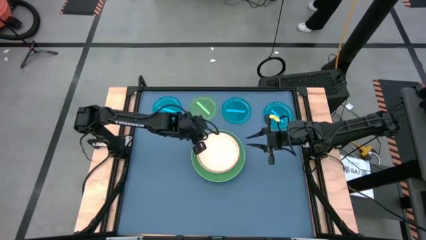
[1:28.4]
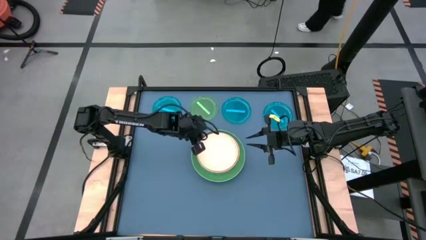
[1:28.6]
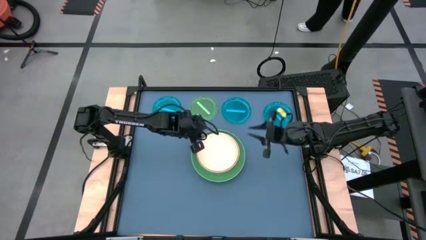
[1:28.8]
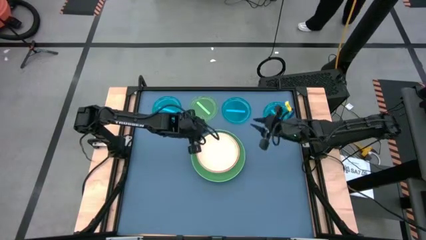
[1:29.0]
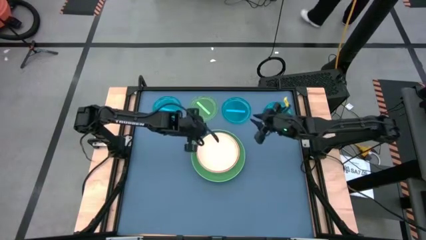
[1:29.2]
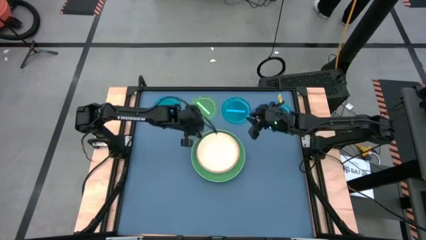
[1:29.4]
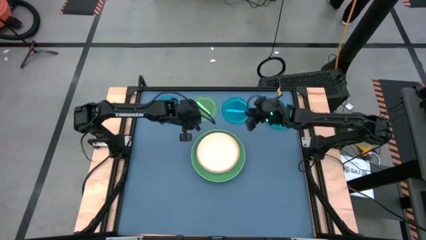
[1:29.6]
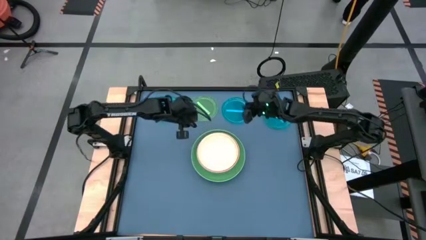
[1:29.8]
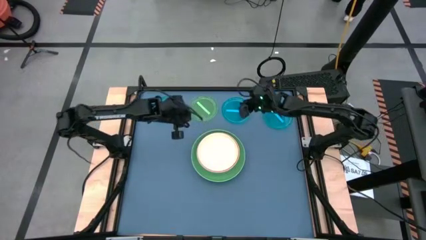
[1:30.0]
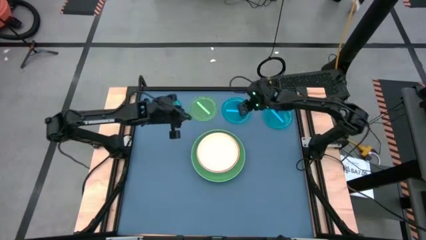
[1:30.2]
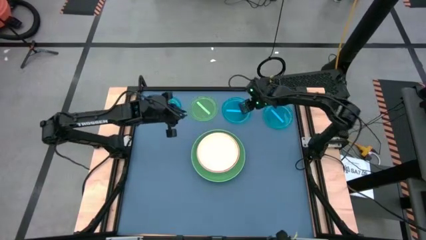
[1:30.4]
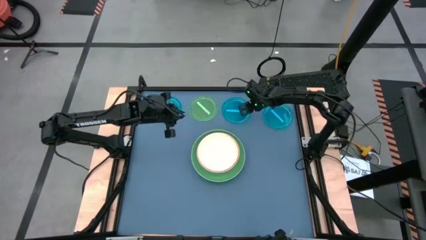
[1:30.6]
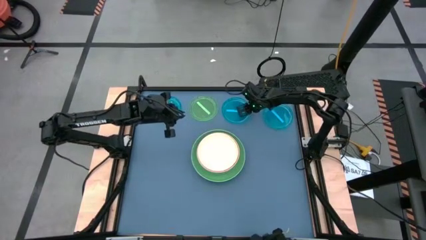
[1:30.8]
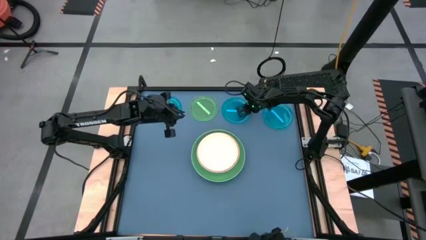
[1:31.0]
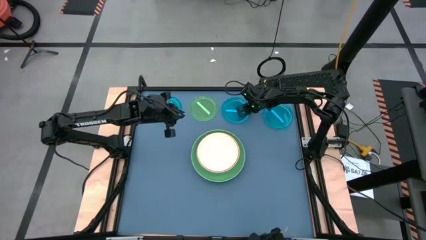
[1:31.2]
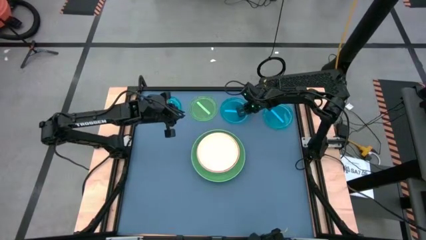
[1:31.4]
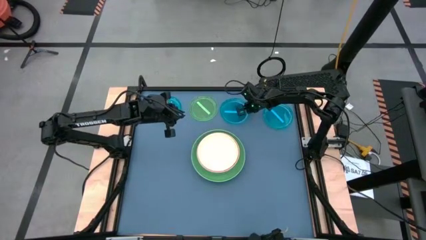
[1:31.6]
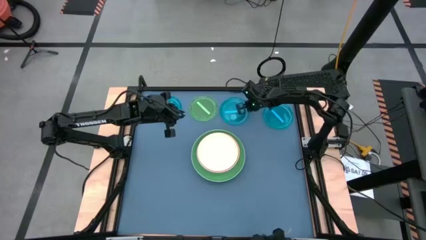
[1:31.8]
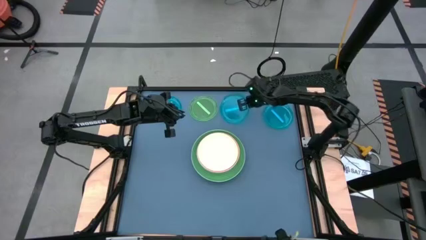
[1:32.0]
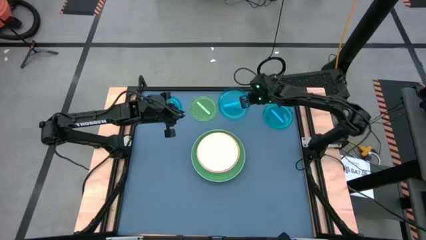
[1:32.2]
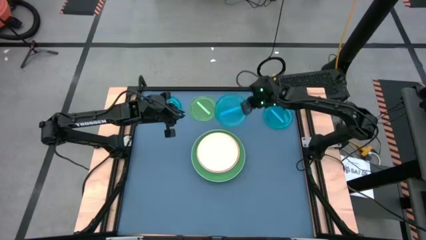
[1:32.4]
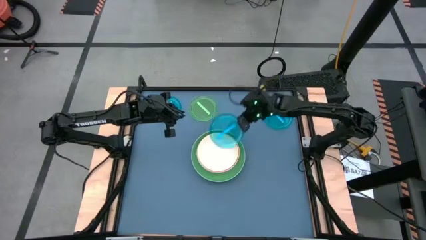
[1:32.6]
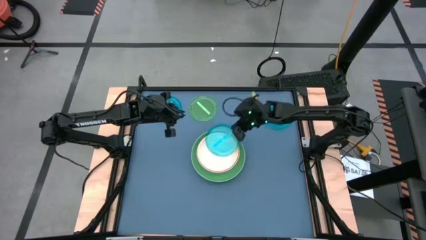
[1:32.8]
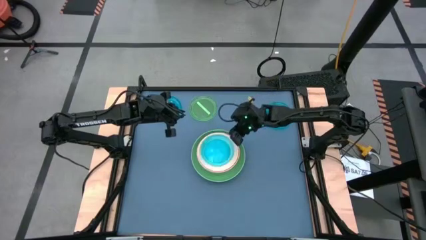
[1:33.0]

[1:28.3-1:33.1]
Task: Stack plastic plates
Stack the middle blue plate on the white plate

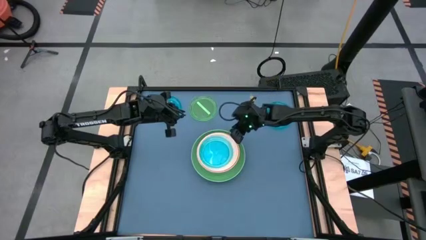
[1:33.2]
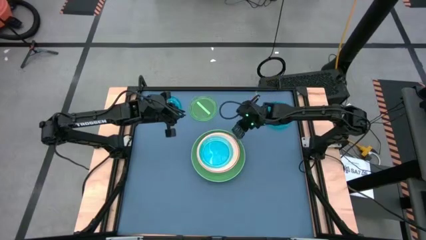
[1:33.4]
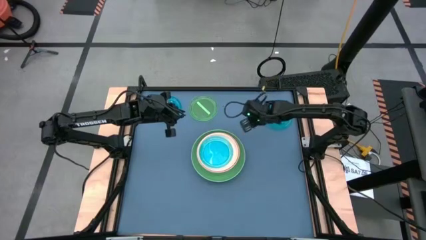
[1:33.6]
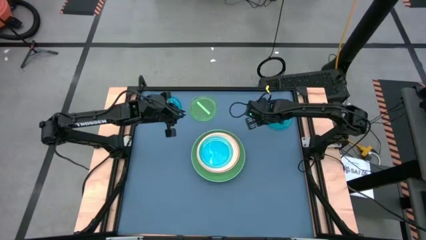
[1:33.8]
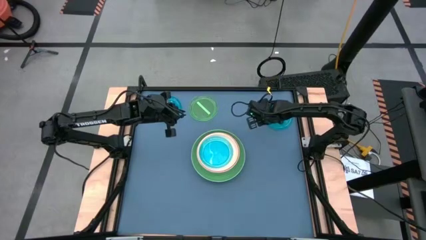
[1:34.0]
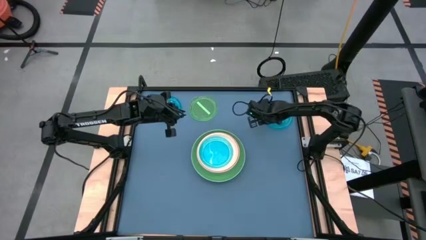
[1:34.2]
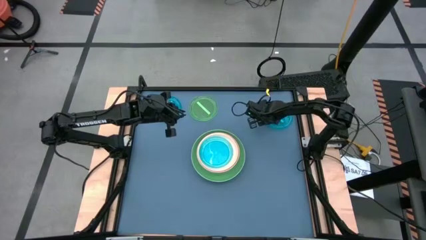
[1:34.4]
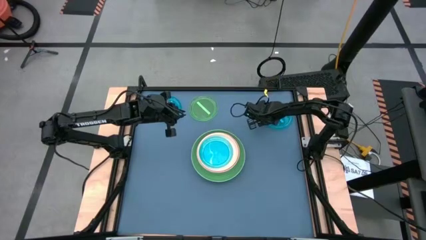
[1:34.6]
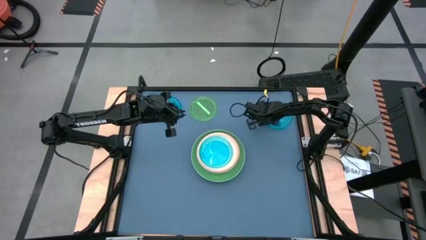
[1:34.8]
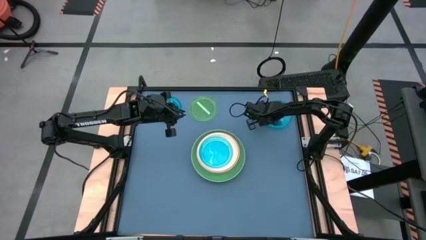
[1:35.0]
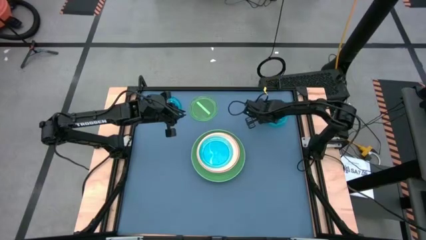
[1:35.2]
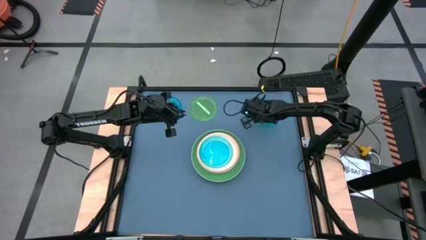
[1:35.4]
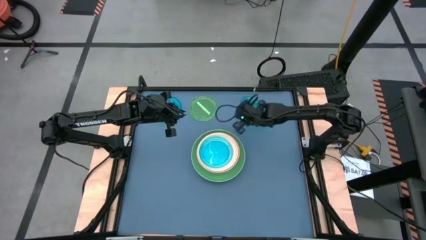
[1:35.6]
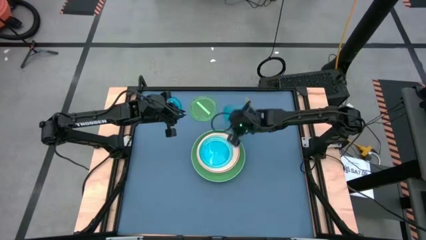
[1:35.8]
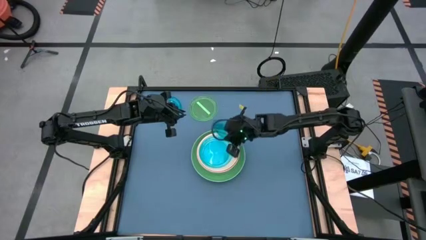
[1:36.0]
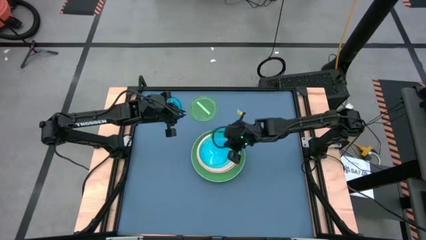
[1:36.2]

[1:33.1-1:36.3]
Stack the right blue plate on the blue plate

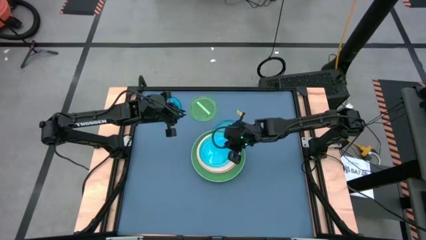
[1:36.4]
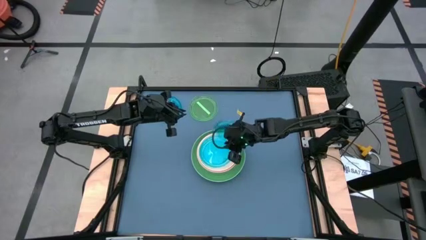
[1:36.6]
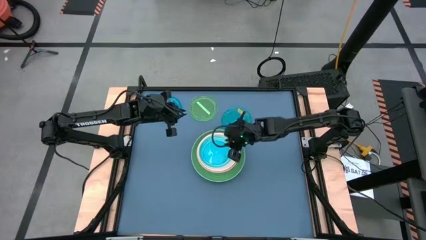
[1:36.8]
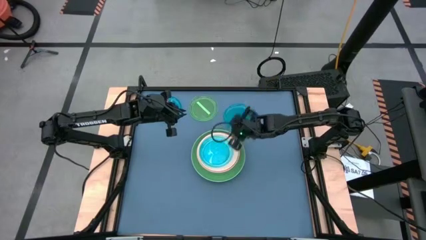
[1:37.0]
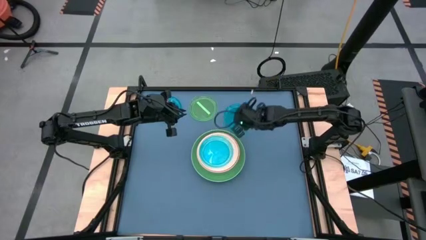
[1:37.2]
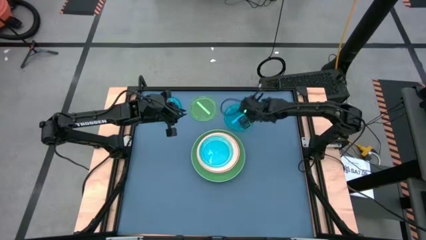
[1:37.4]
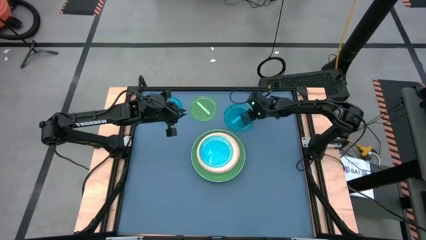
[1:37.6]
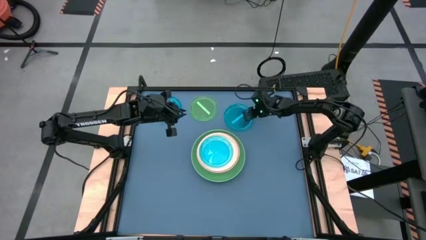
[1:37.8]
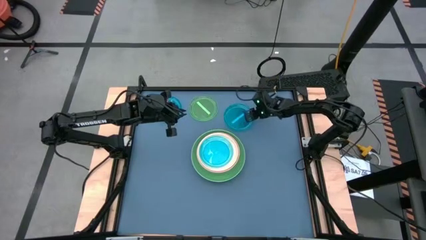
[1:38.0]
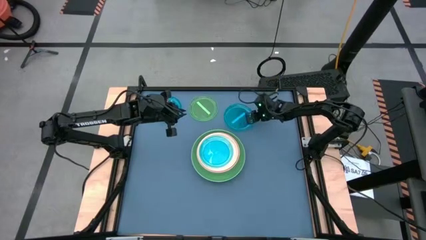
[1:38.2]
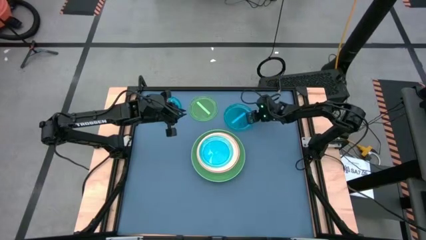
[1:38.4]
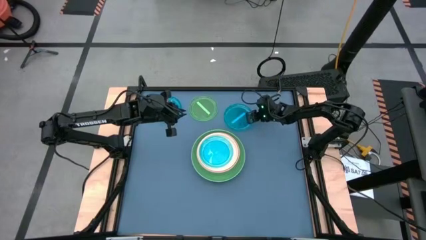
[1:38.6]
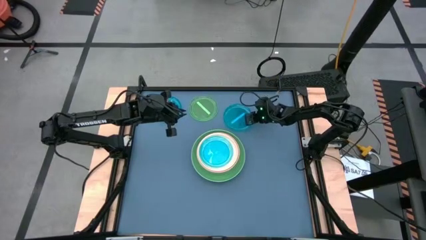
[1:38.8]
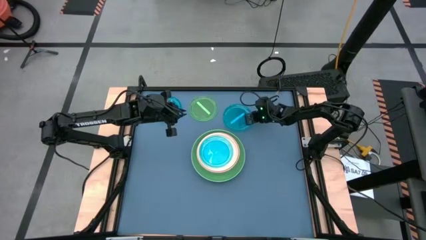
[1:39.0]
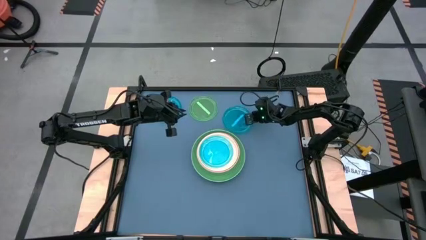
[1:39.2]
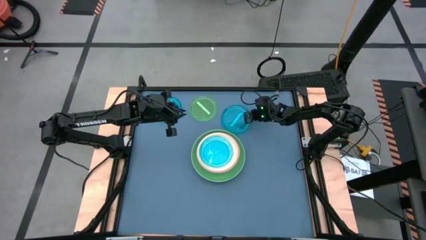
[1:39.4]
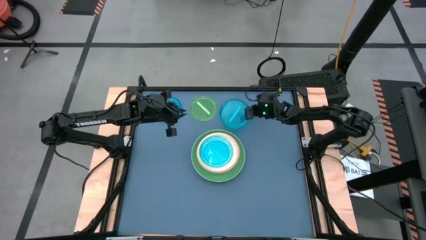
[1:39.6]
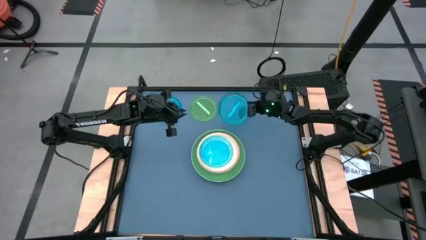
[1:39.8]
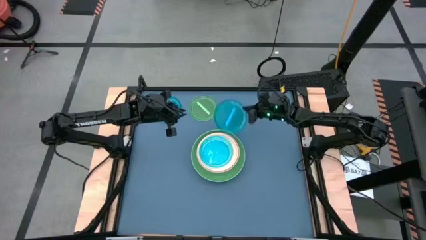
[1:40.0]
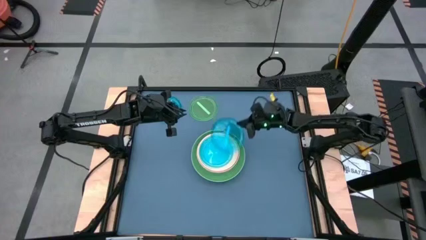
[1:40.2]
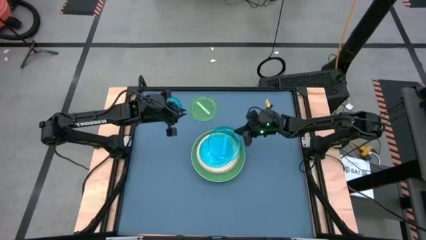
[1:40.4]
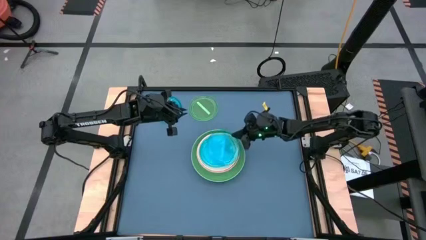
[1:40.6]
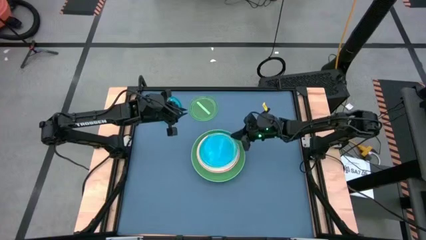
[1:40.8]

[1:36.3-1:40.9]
Stack the right blue plate on the blue plate
